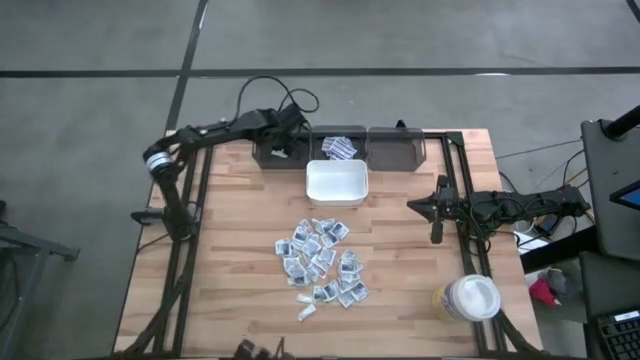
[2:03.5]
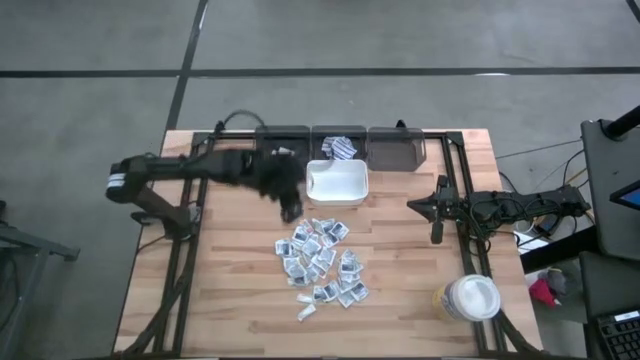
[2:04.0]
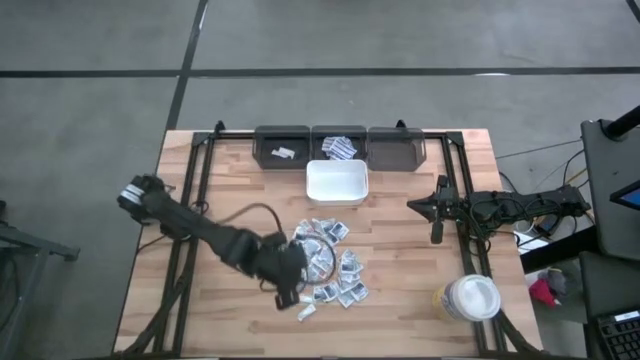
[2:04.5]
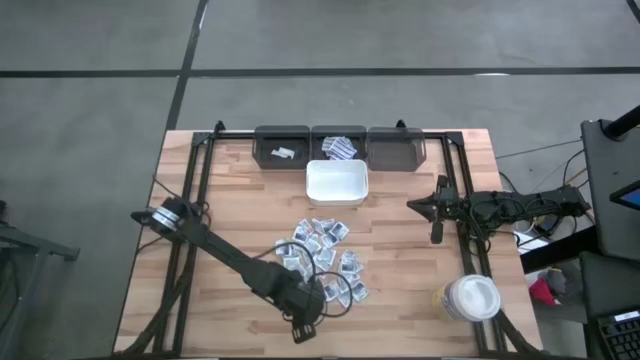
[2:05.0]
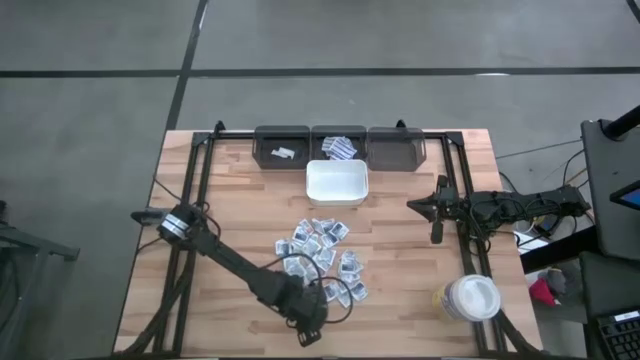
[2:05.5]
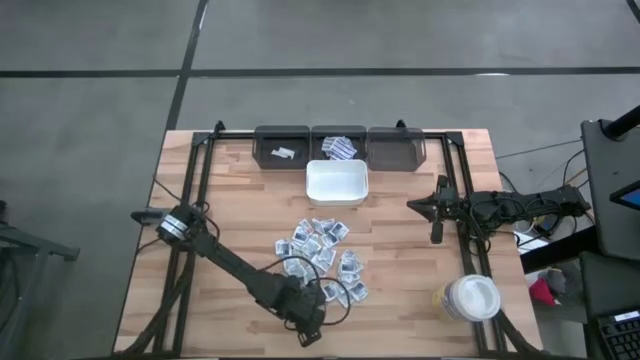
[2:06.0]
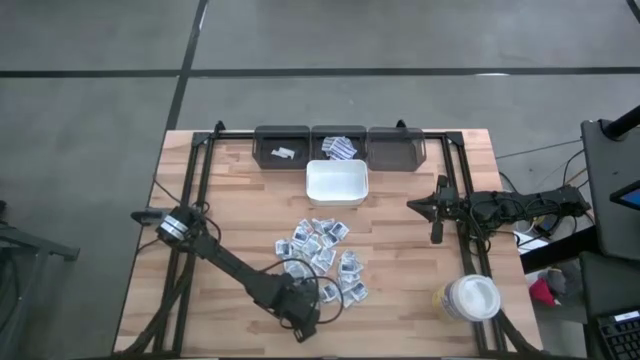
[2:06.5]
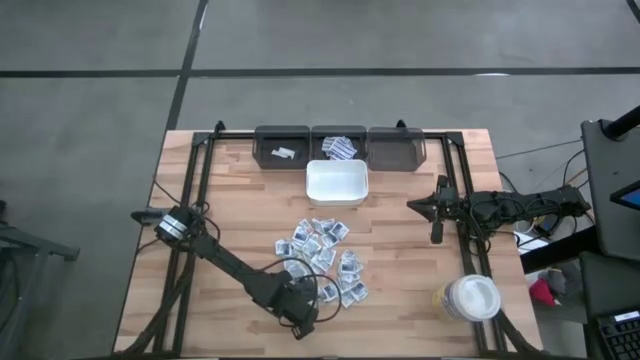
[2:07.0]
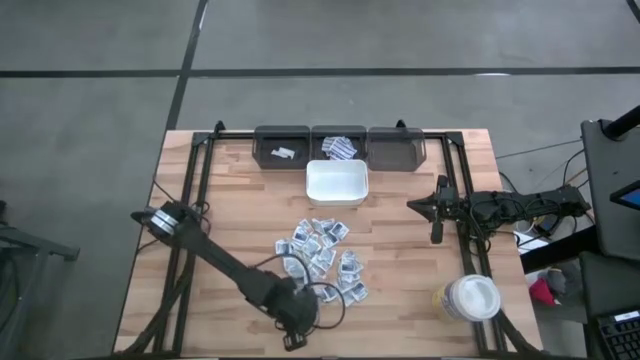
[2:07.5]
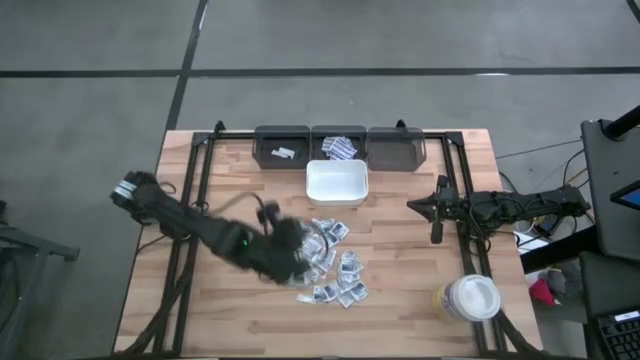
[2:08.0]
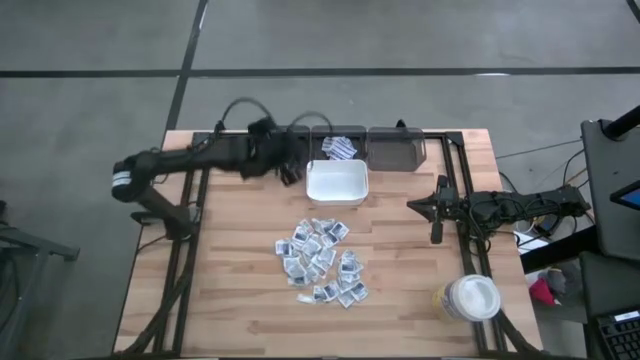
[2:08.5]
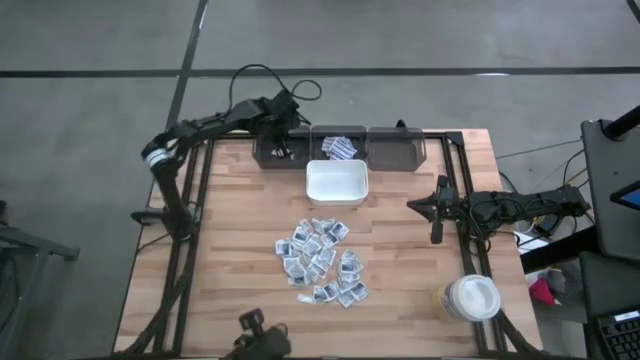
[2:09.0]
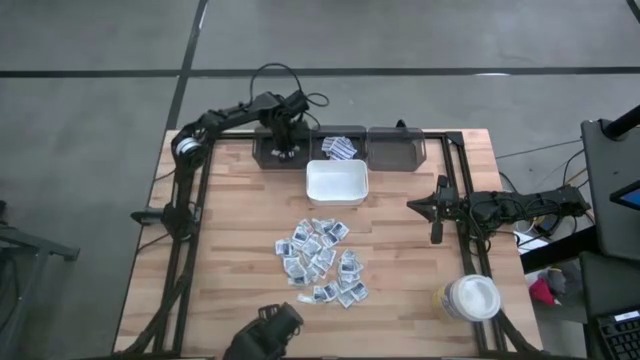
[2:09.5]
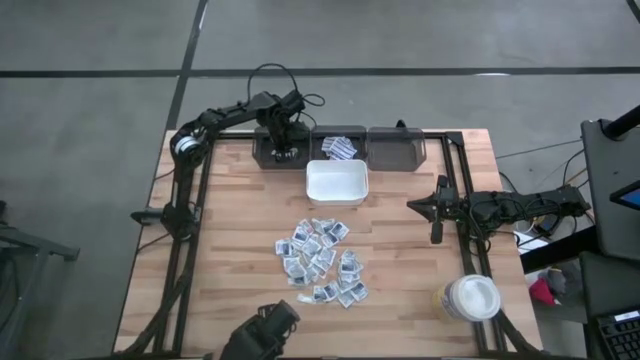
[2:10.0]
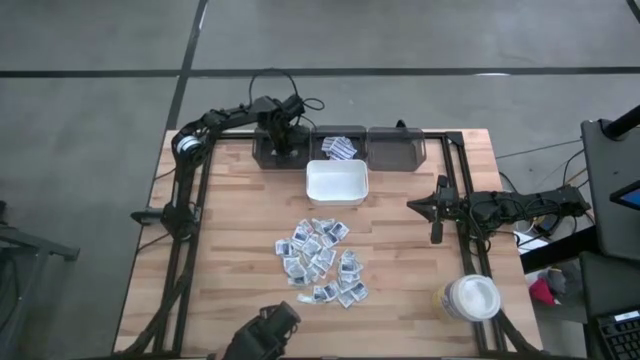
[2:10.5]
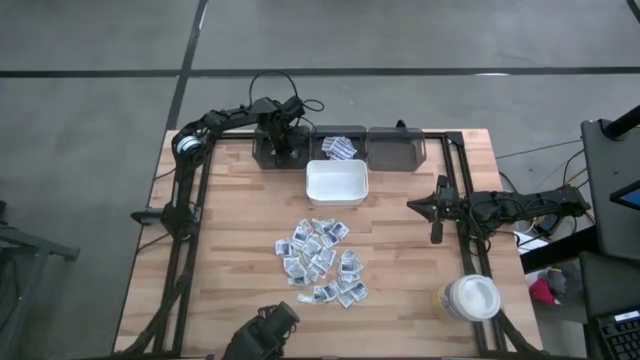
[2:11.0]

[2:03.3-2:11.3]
Task: Pick & Place First Aid Supplies
Put the green bandage into the left black bin

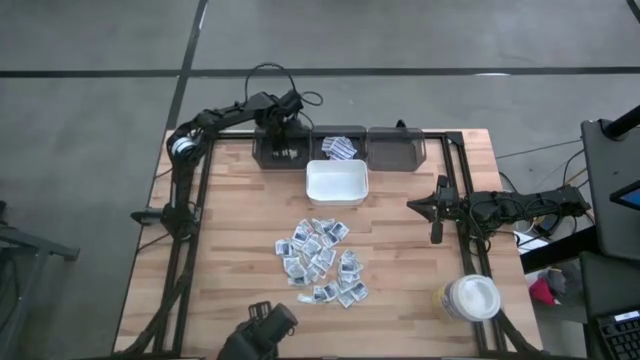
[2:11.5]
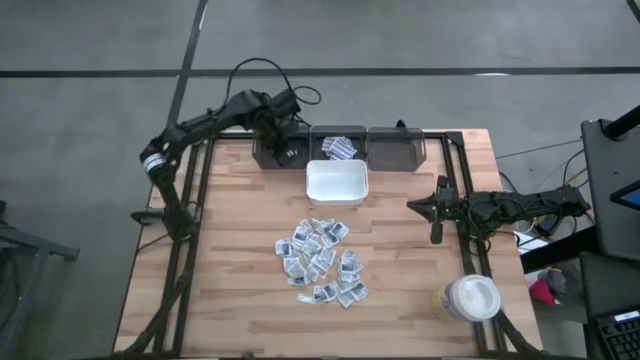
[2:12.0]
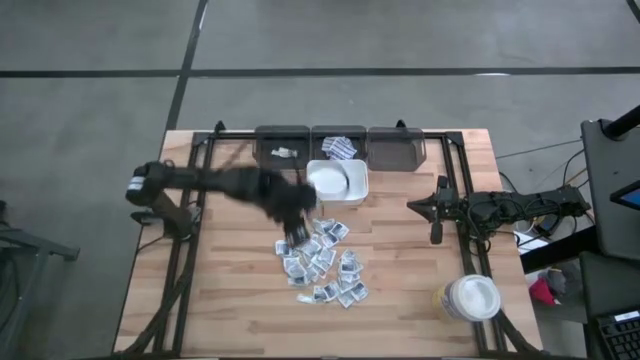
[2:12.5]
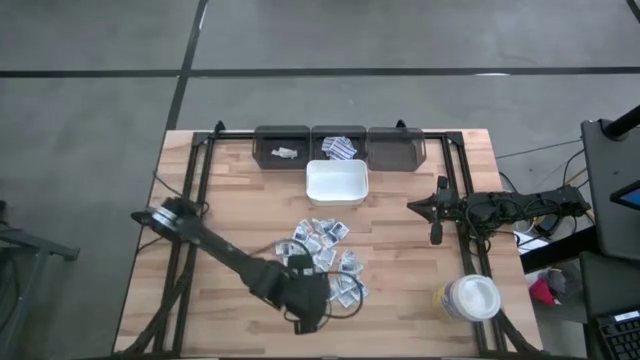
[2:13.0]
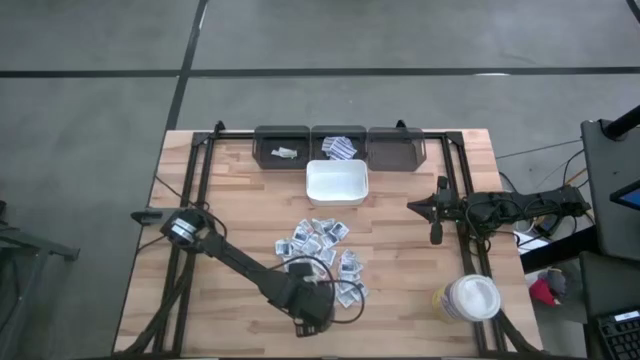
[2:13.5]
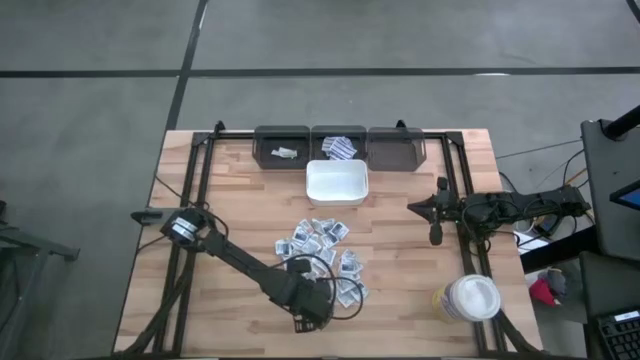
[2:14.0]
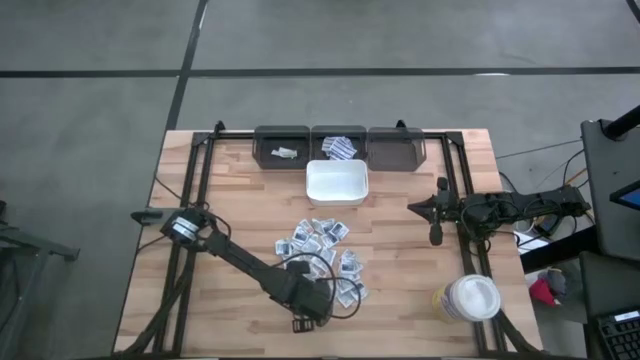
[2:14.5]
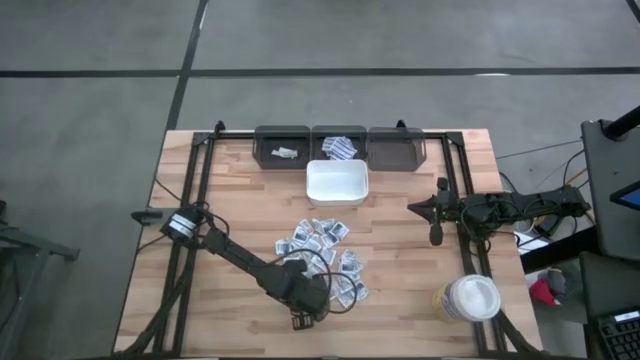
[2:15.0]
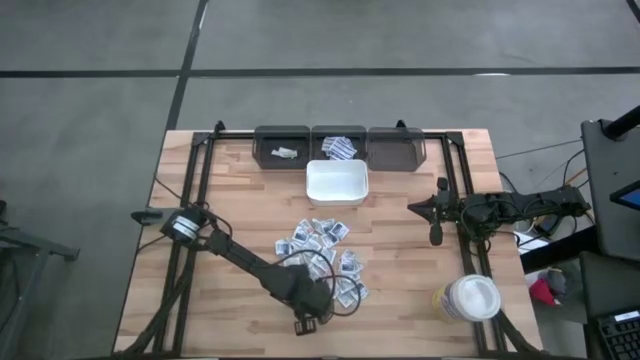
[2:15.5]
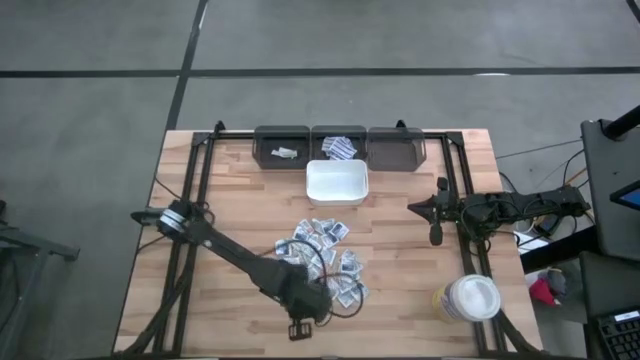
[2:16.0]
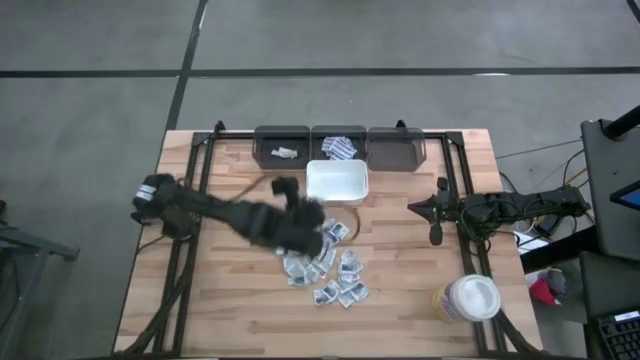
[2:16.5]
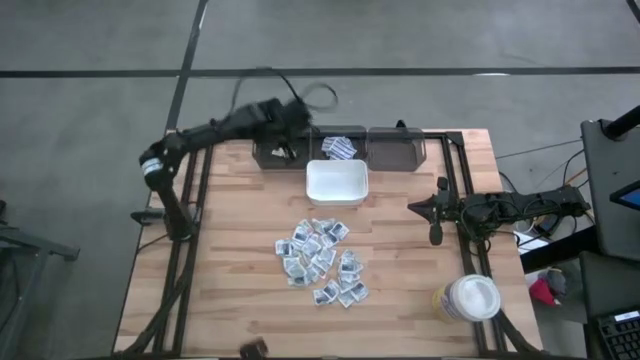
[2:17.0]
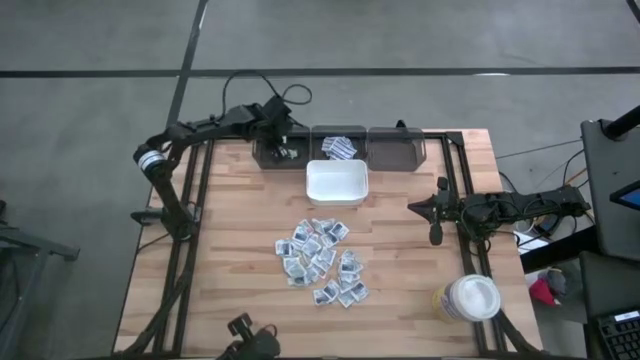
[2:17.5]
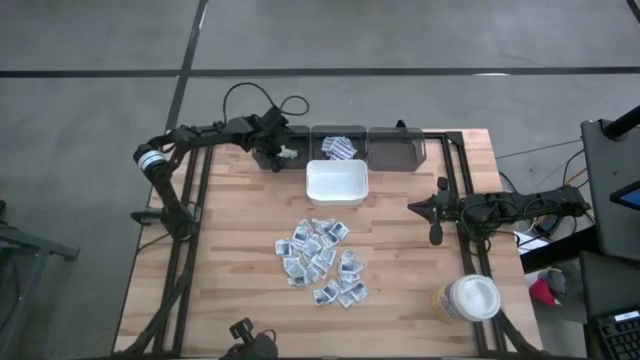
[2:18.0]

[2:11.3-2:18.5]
Put the green bandage into the left black bin

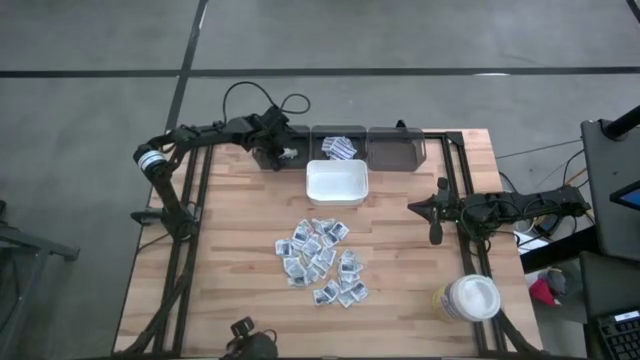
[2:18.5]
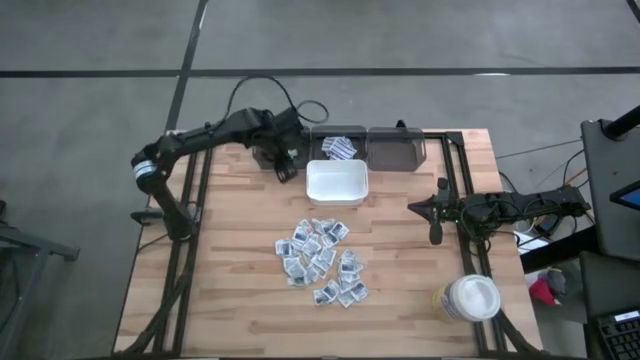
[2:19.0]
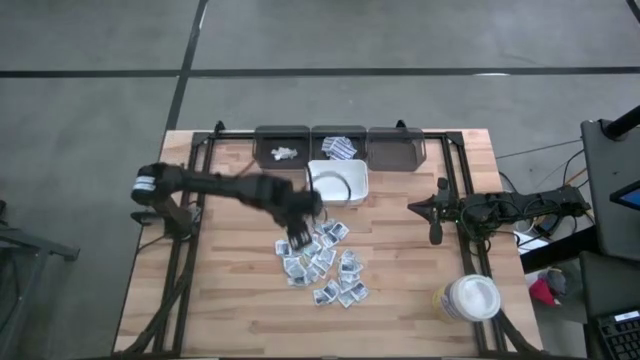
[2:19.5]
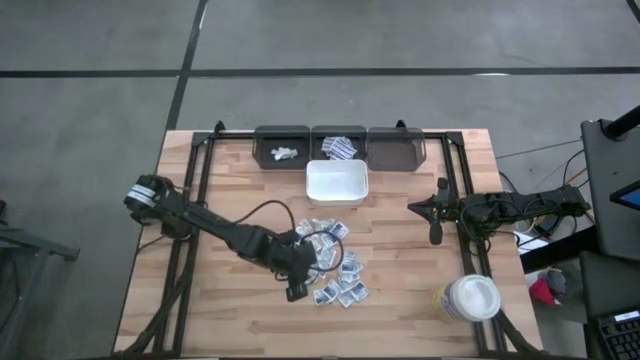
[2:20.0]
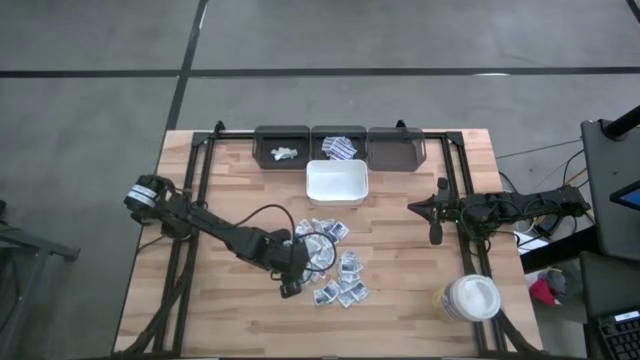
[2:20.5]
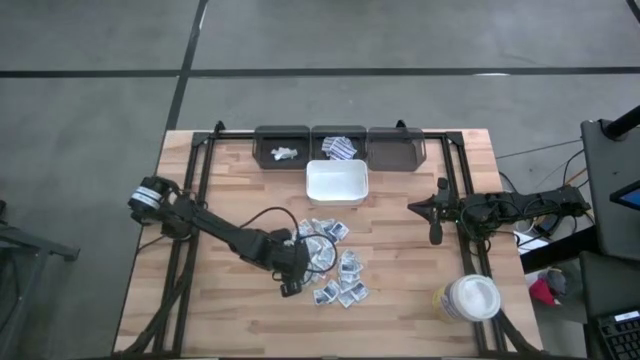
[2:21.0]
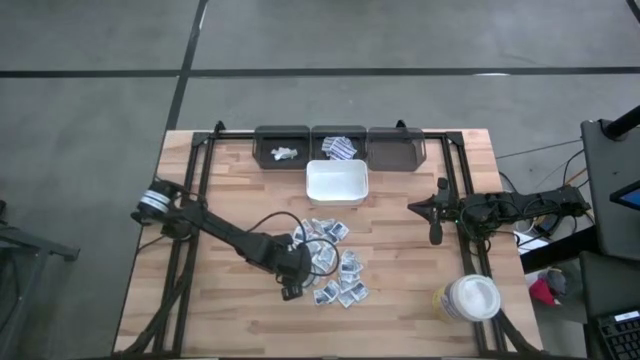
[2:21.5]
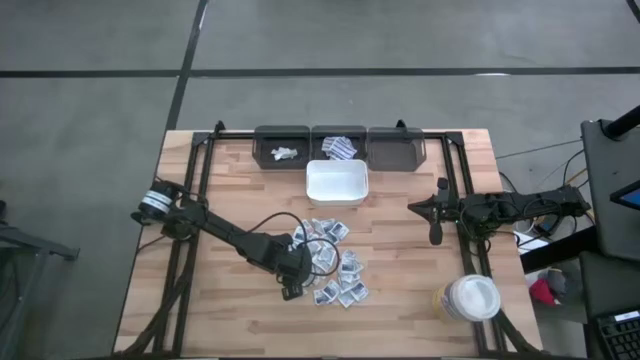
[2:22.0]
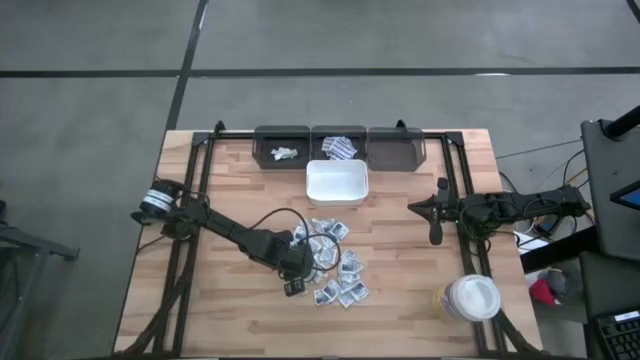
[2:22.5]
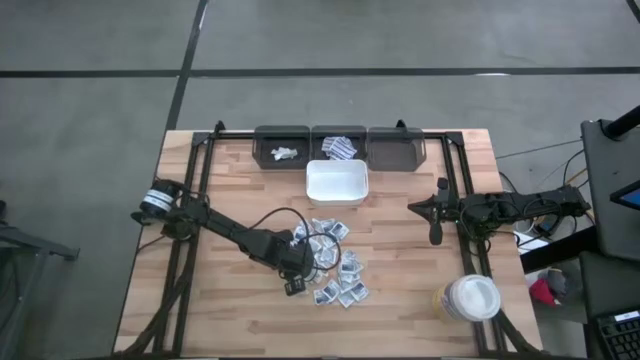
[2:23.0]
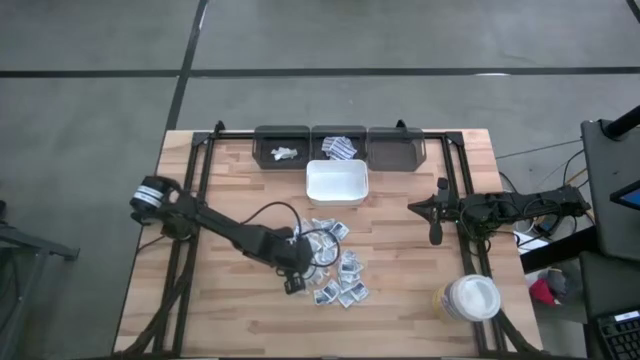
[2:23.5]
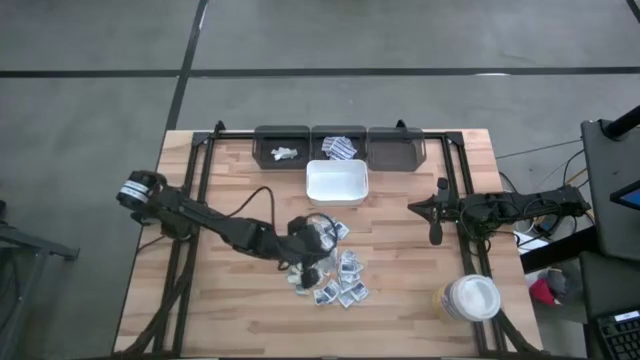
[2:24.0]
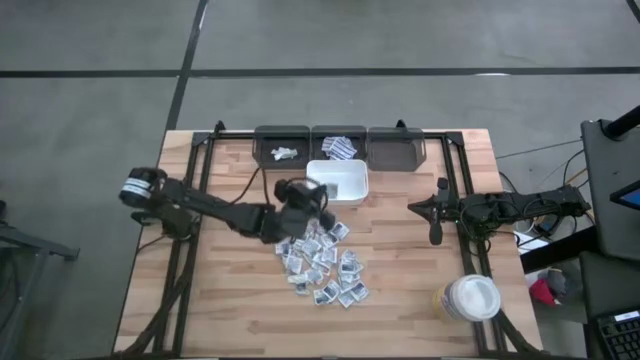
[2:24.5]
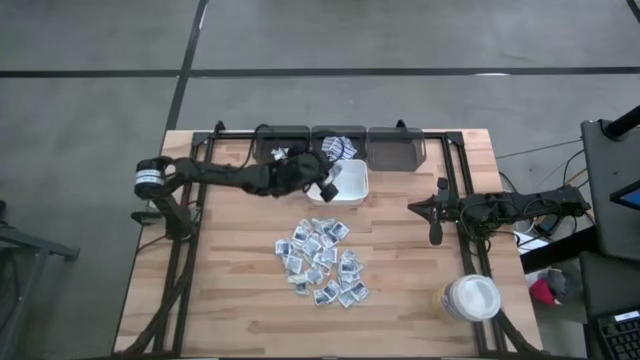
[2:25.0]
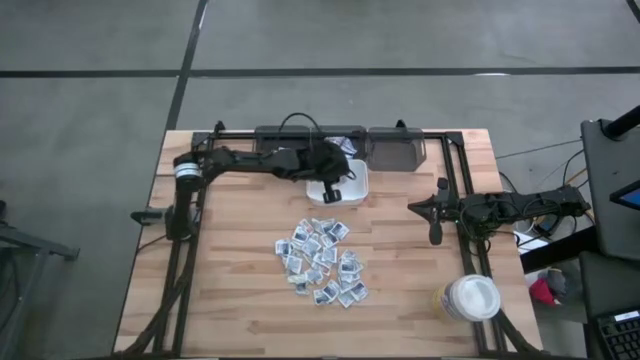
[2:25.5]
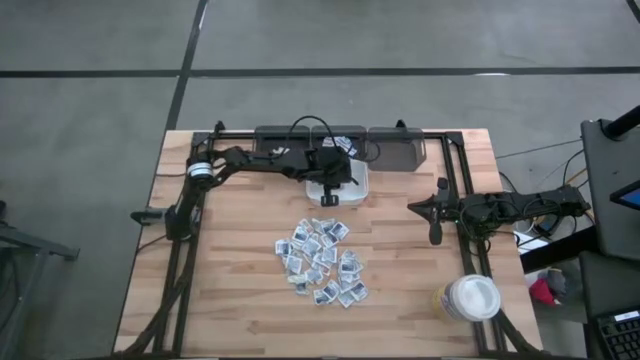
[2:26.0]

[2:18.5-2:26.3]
Put the blue alcohol pad into the white bin
